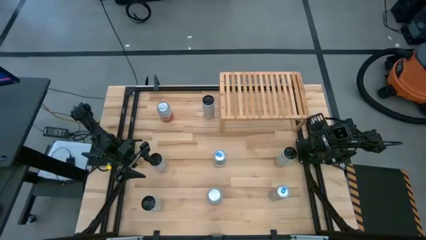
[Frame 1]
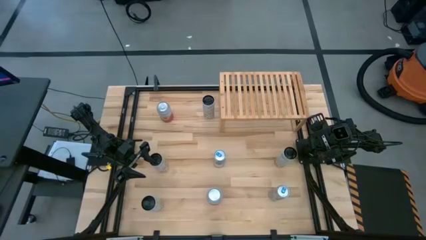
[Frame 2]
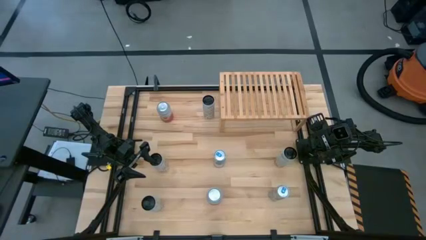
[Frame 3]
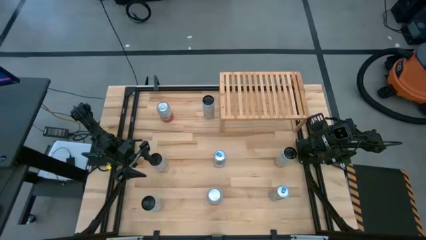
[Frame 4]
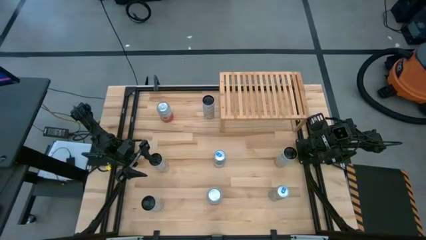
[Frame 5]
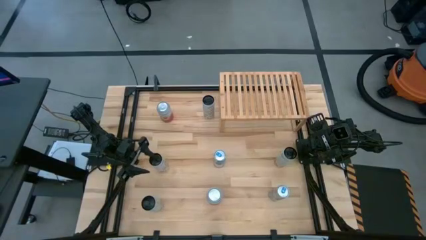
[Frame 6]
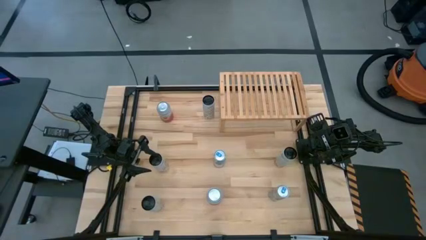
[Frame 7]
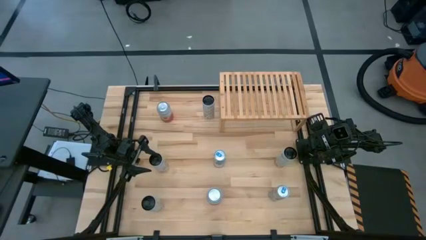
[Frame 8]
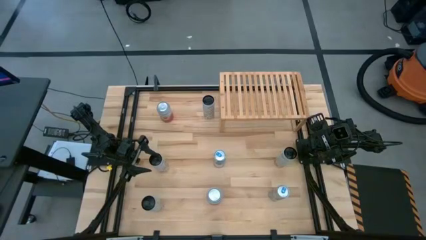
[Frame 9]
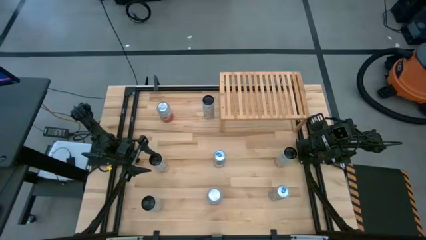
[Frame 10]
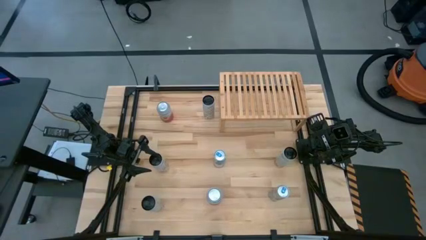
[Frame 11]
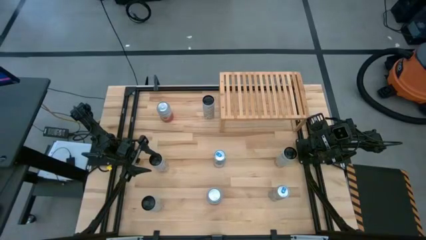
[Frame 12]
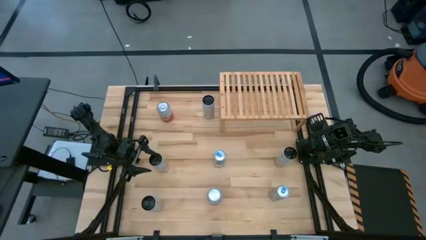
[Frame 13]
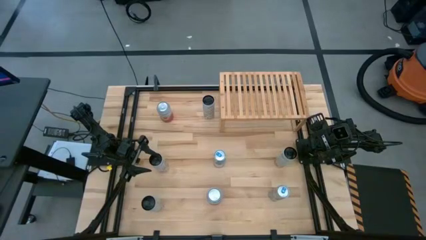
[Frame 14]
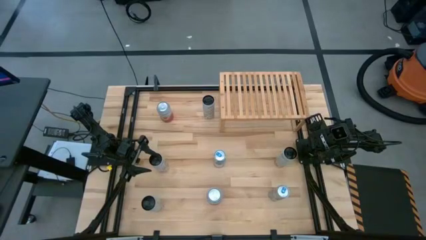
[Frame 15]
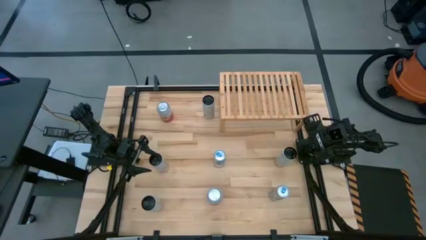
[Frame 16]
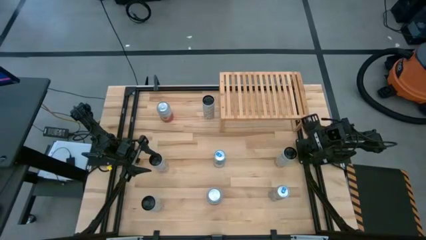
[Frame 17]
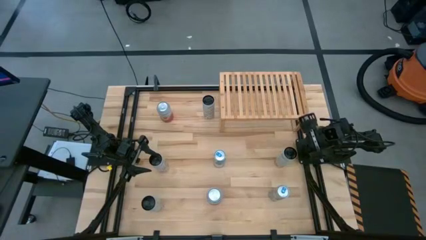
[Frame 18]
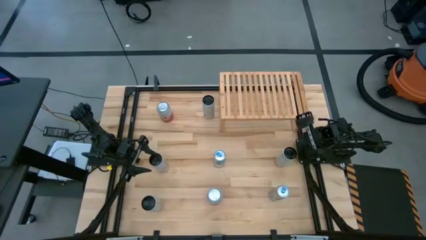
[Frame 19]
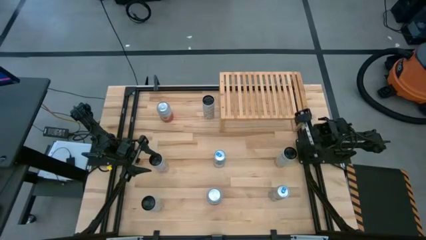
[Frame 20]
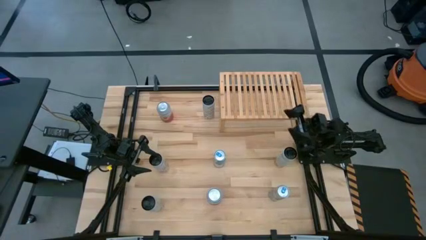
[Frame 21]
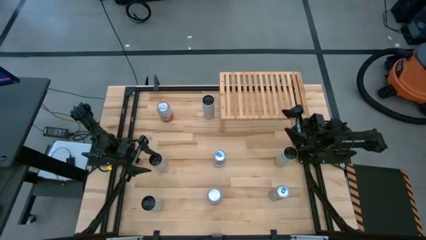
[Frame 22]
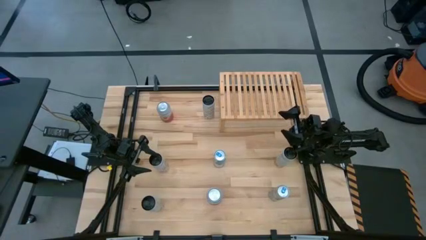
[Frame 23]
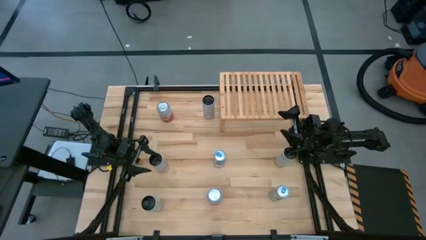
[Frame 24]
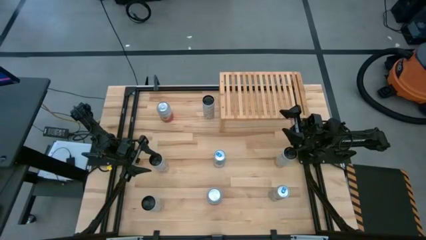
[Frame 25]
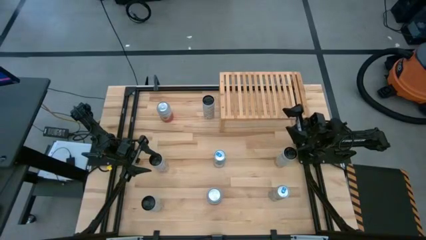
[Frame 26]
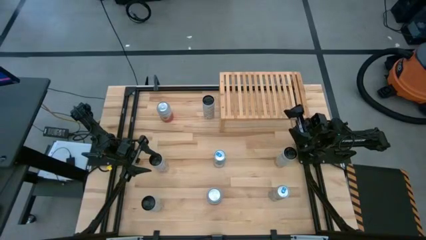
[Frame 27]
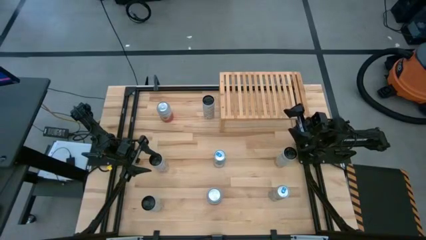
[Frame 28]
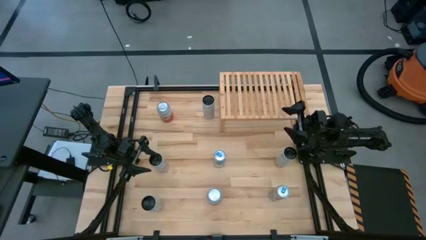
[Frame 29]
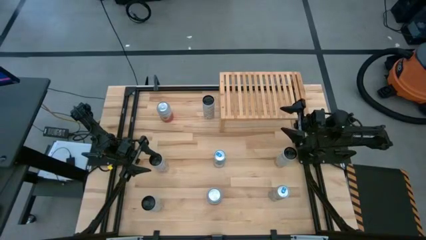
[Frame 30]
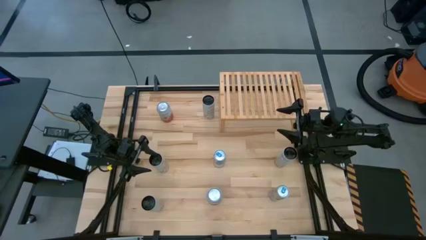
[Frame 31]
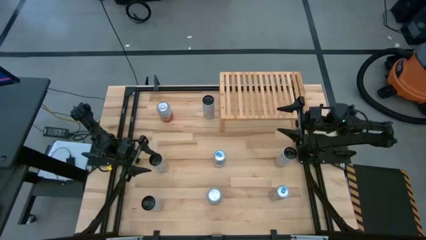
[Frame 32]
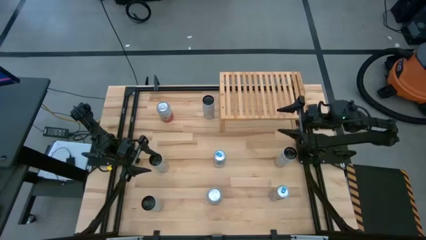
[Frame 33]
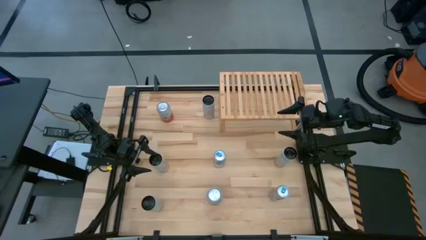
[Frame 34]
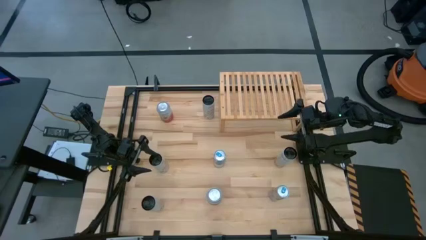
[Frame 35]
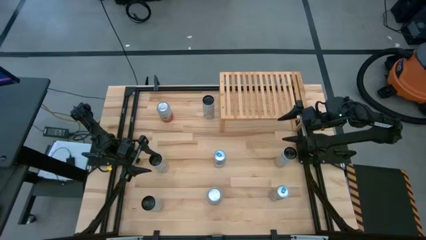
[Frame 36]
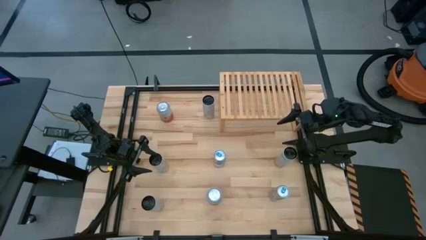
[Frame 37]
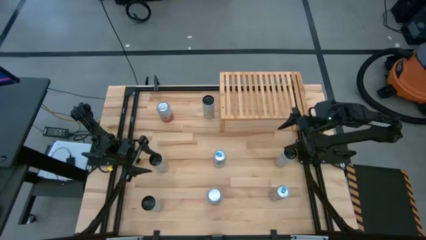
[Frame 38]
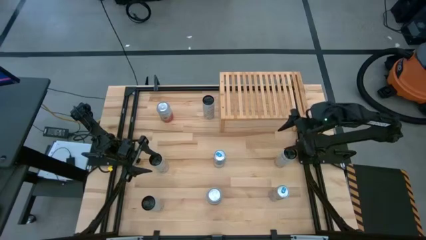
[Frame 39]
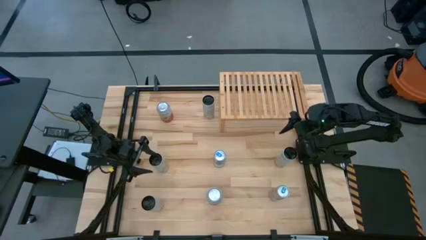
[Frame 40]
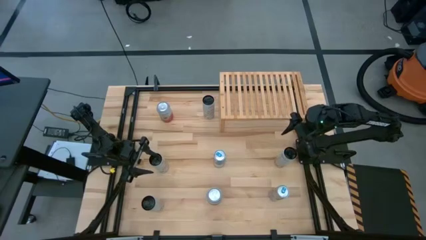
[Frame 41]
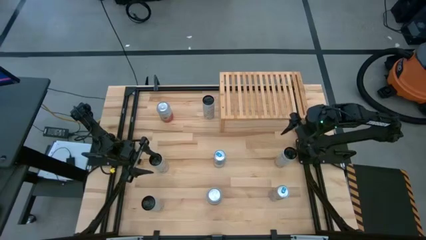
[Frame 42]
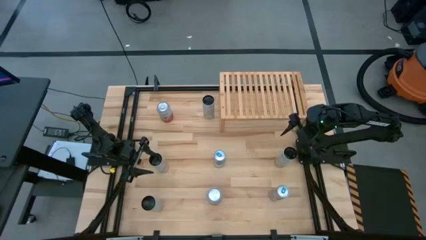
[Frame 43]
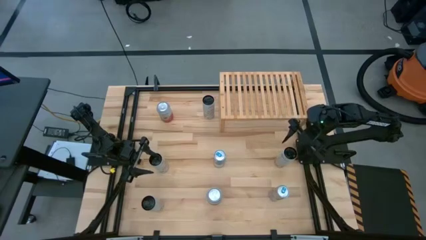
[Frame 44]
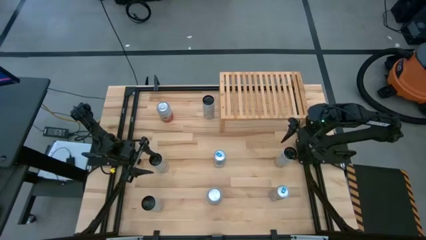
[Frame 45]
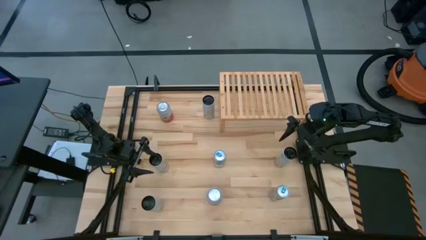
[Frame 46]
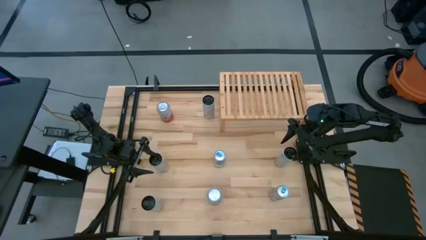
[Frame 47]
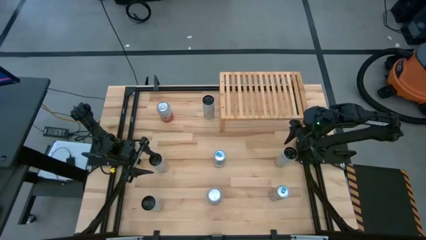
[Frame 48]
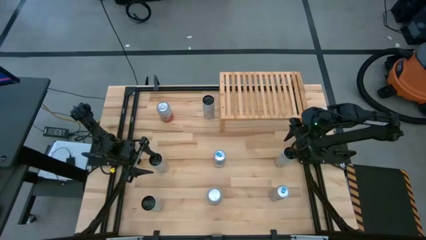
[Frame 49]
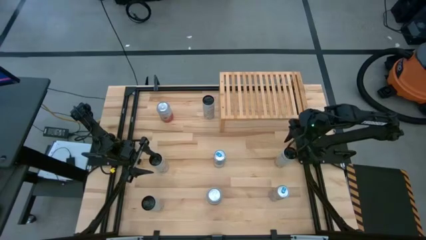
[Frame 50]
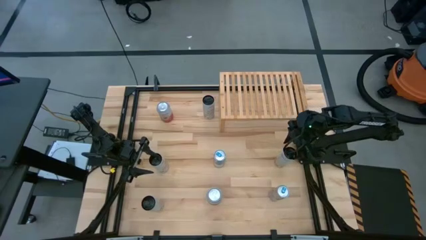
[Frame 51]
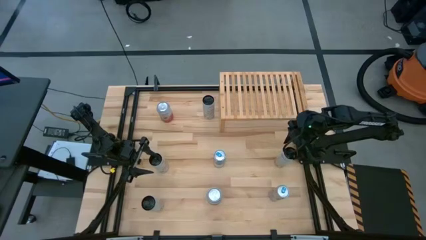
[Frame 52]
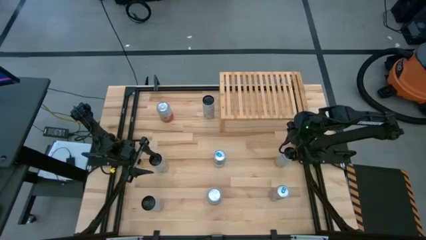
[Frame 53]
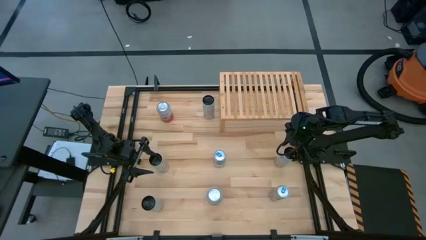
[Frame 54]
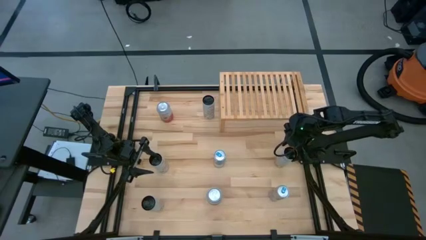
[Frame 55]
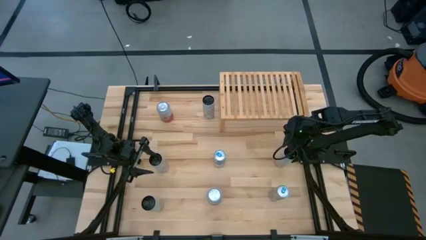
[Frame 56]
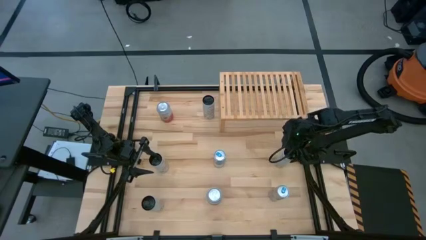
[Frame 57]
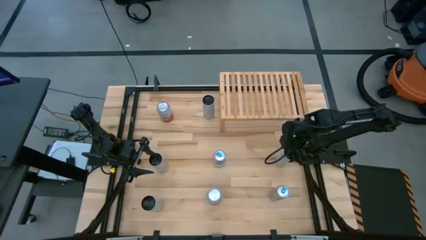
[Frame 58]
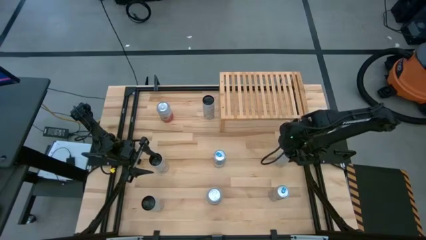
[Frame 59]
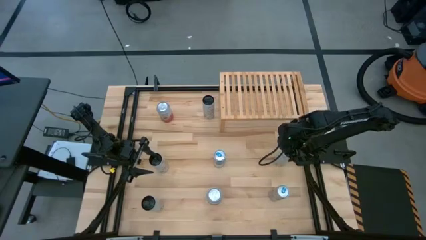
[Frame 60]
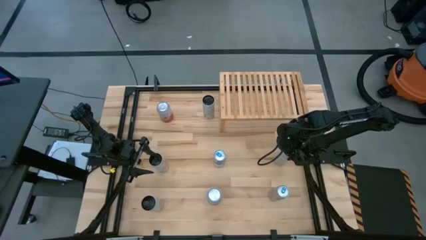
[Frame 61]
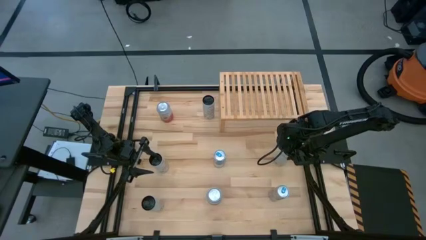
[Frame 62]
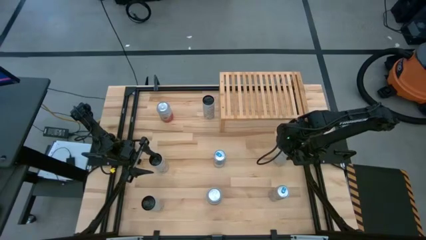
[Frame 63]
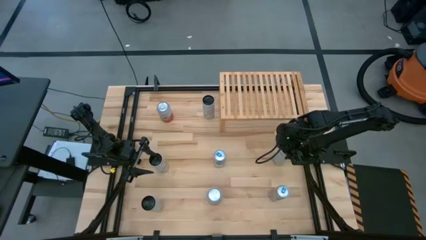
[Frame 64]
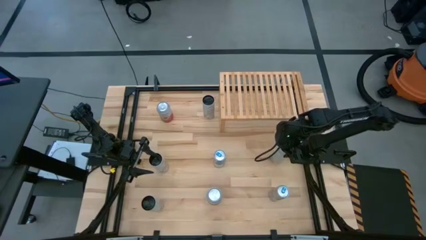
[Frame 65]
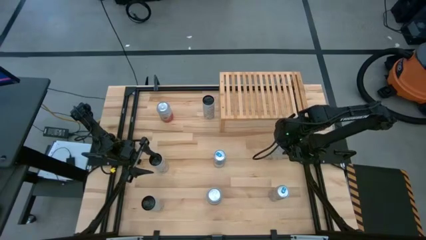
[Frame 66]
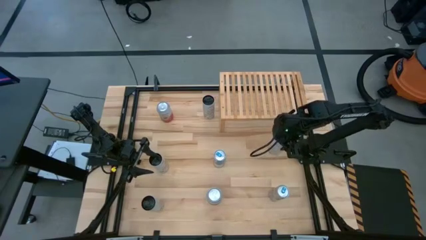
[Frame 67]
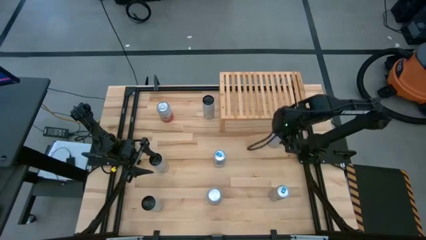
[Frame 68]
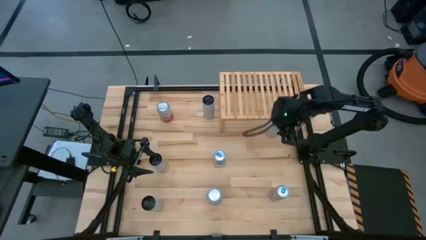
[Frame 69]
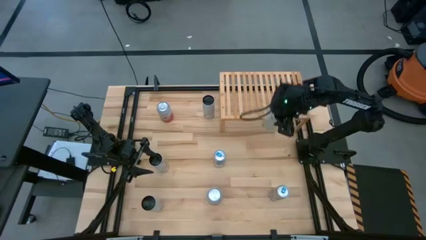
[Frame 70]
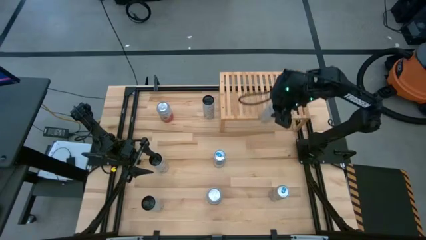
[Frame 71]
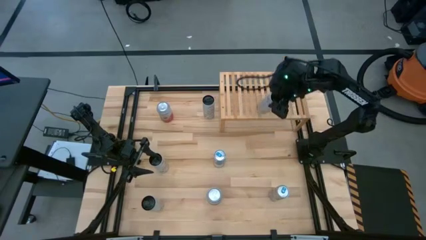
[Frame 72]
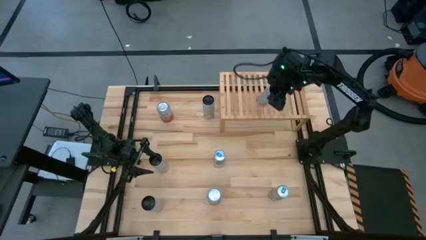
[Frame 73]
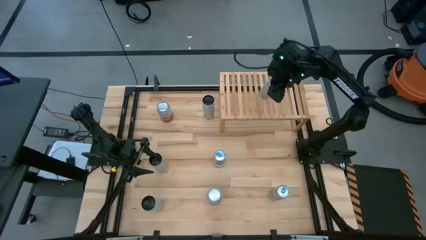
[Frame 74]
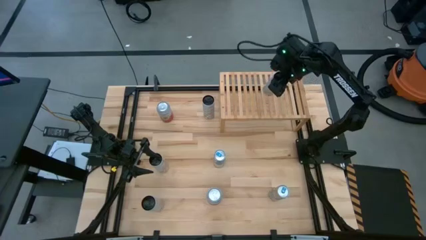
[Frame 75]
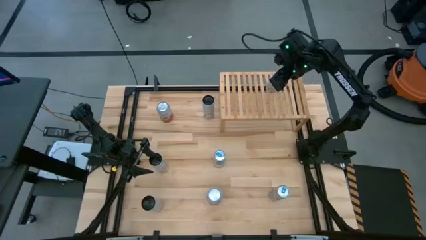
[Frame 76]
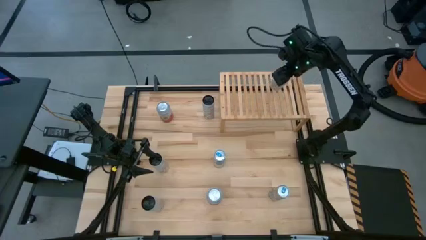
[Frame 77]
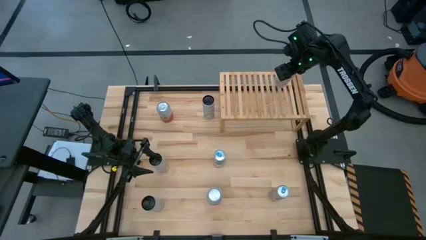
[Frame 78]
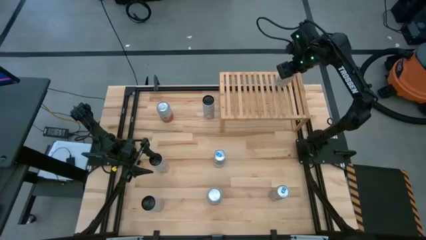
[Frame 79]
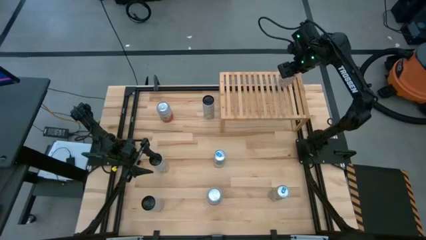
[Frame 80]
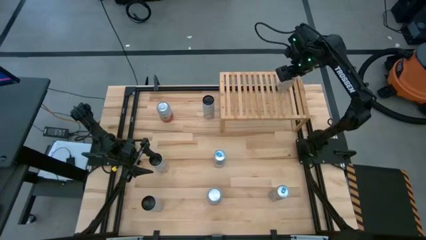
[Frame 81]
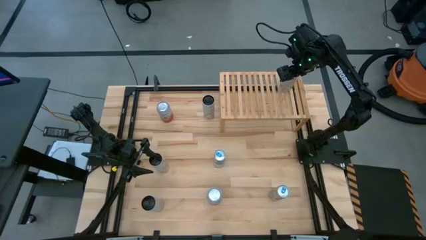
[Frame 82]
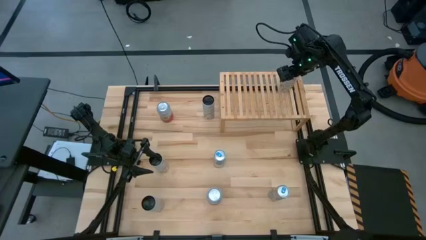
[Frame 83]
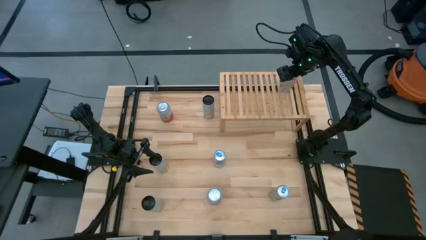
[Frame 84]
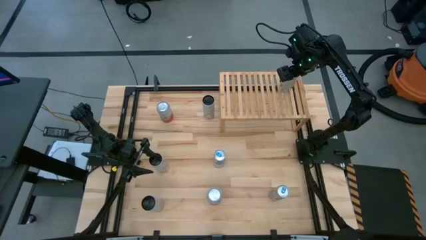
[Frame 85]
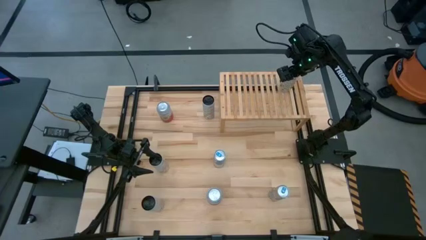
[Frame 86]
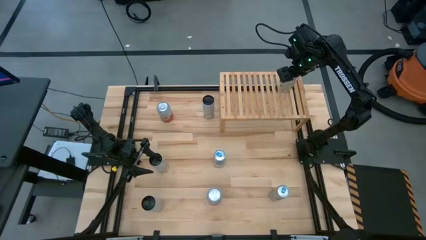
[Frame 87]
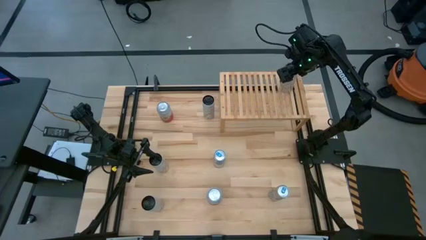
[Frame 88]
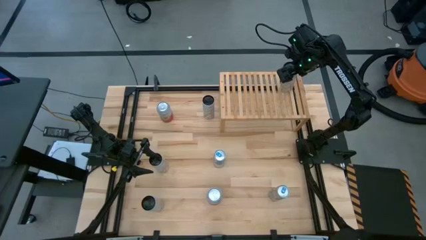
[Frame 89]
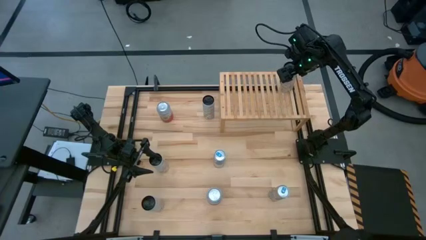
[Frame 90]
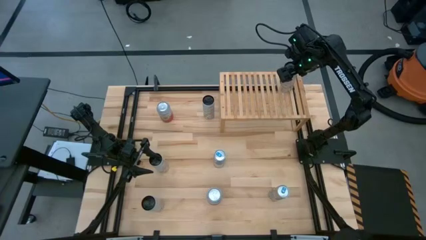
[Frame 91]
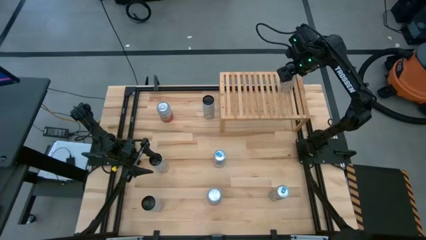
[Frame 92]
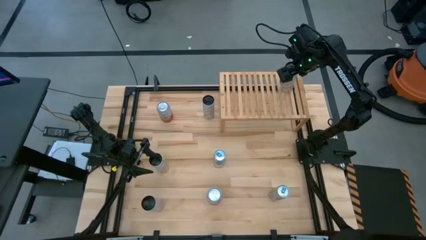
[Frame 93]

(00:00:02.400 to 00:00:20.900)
Task: Place canned beverage on shelf
Put the bottom white-yellow soda can on the shelf
